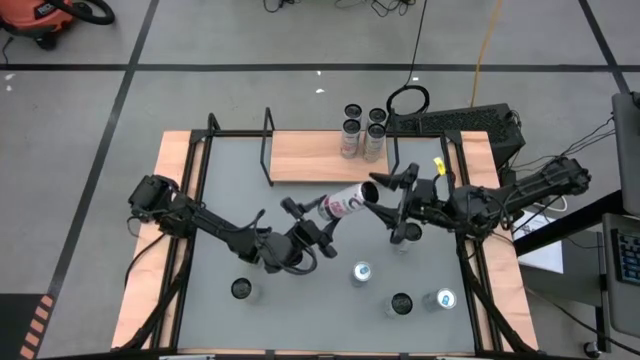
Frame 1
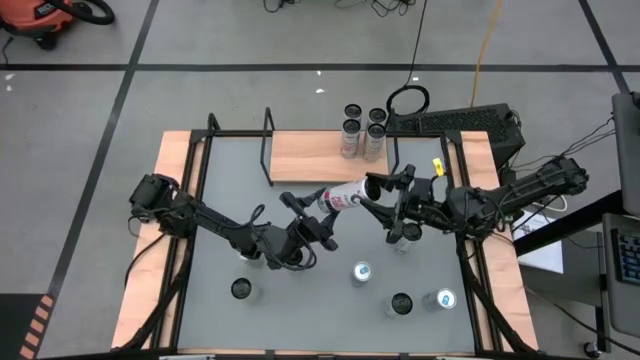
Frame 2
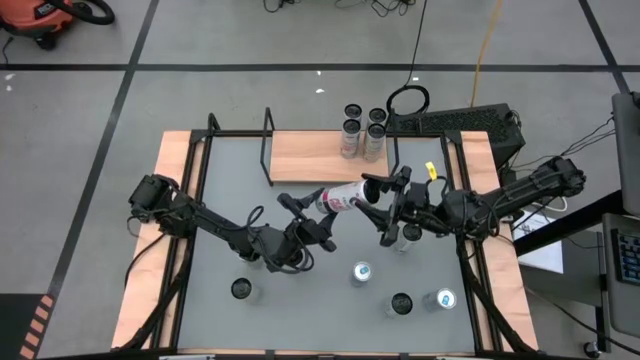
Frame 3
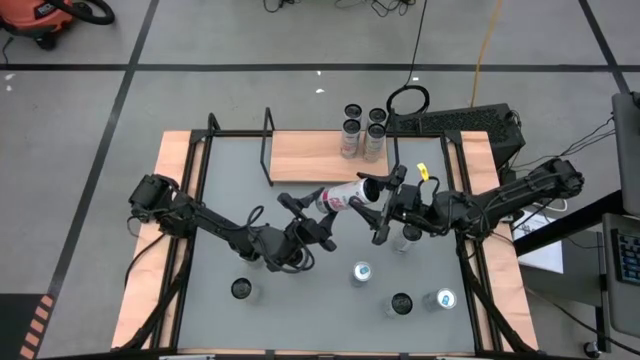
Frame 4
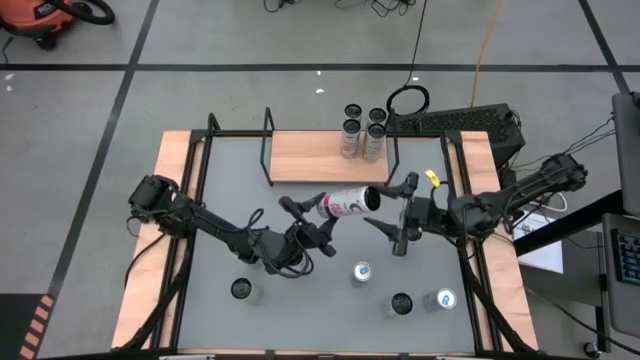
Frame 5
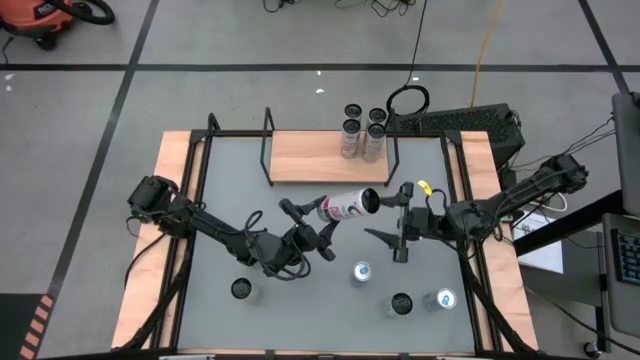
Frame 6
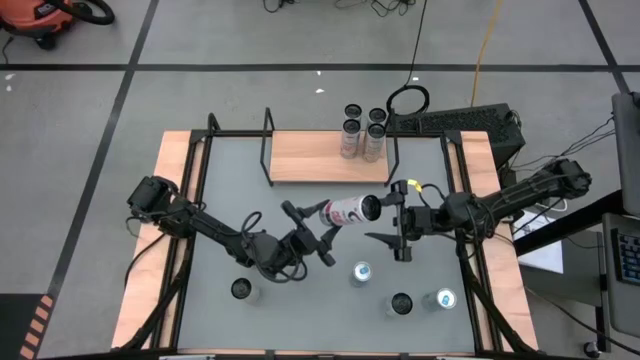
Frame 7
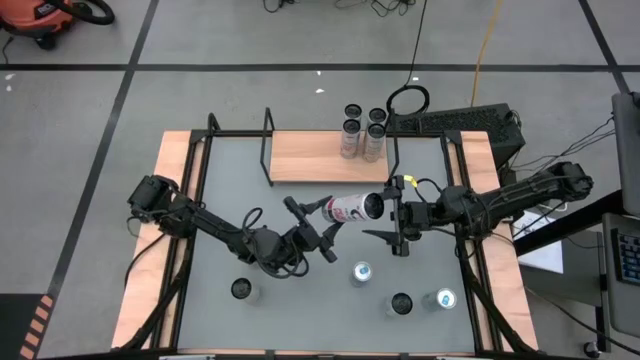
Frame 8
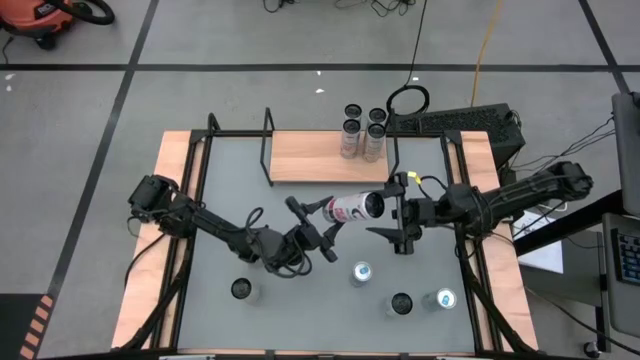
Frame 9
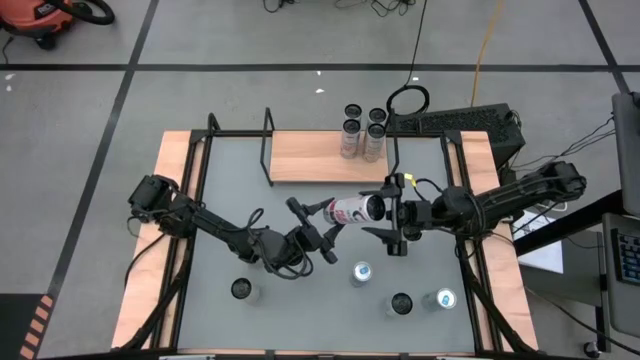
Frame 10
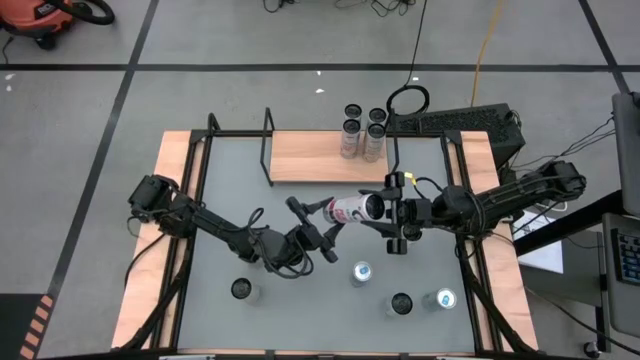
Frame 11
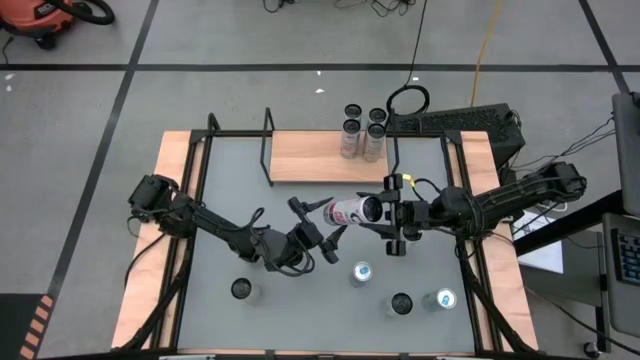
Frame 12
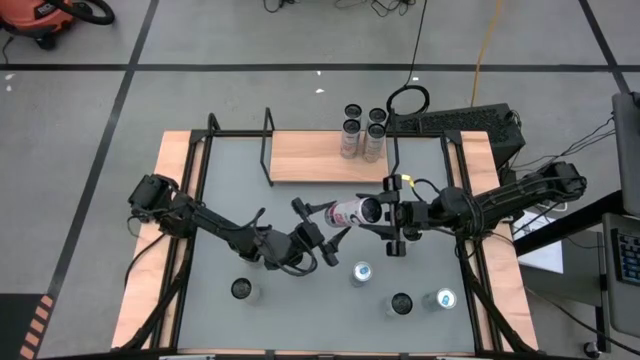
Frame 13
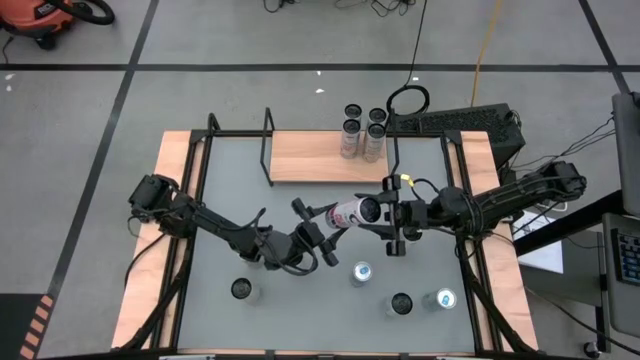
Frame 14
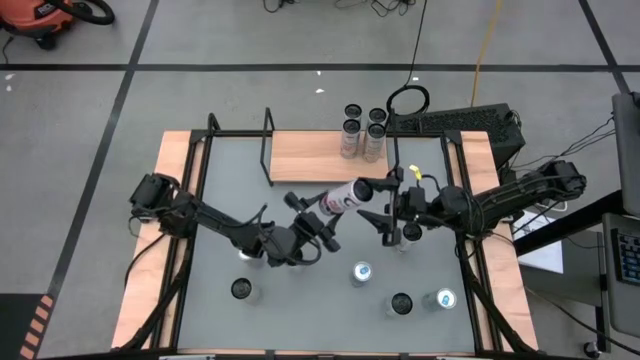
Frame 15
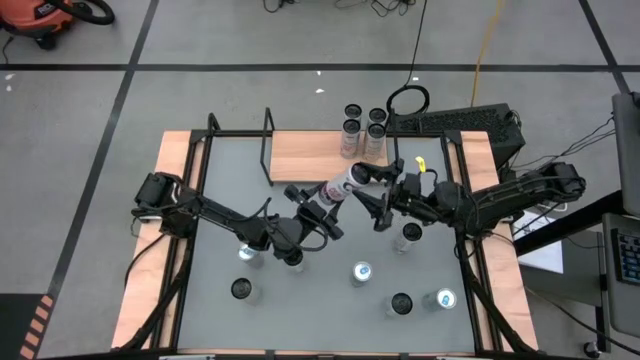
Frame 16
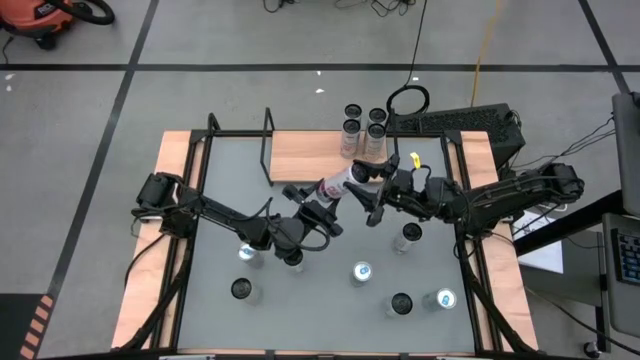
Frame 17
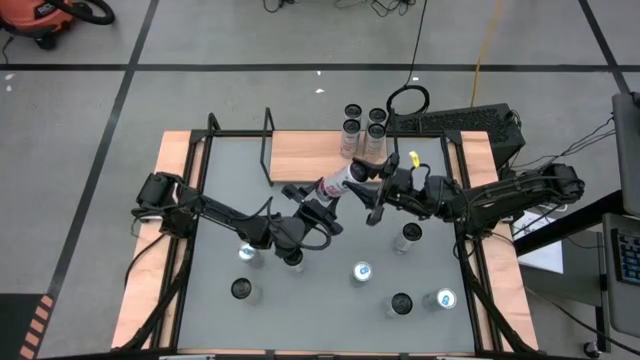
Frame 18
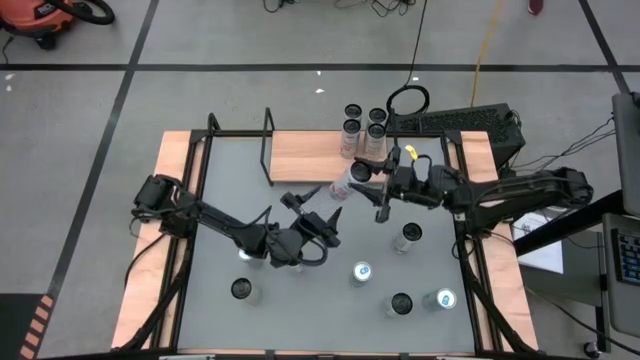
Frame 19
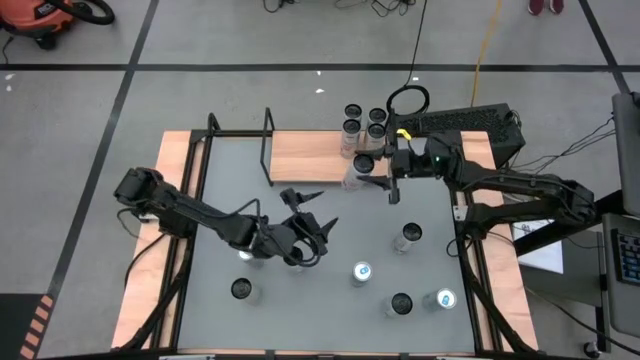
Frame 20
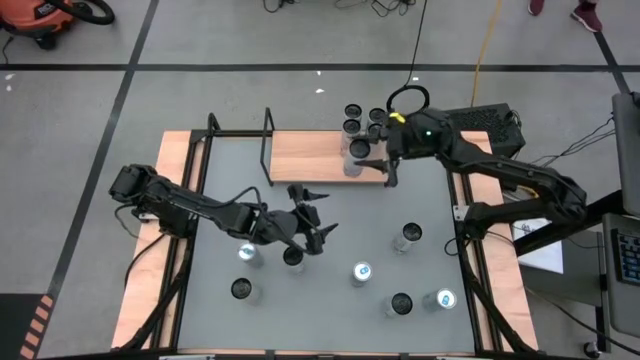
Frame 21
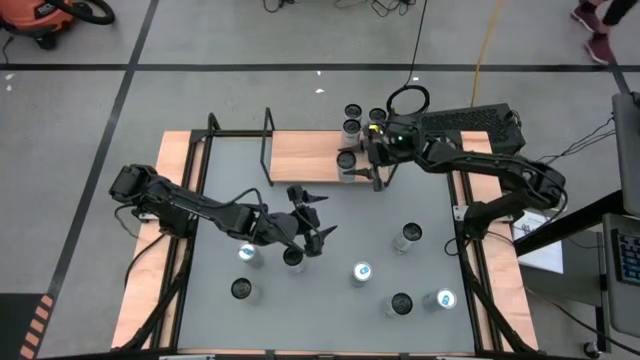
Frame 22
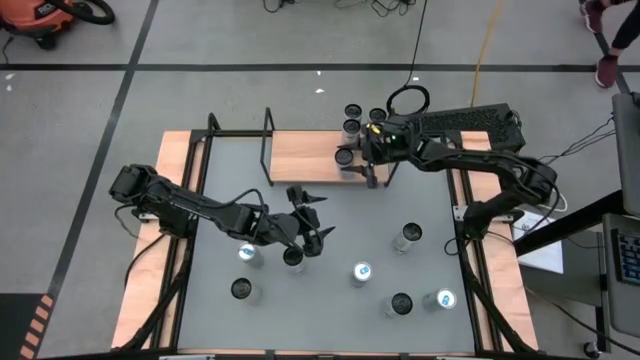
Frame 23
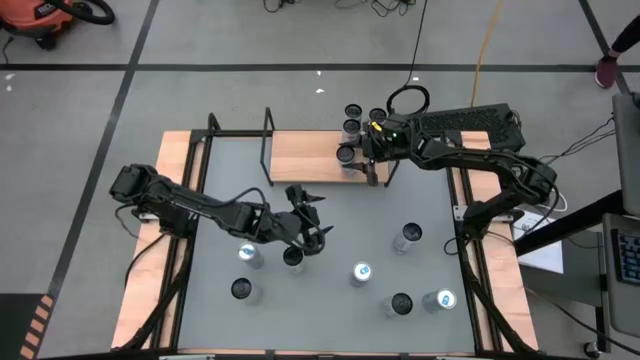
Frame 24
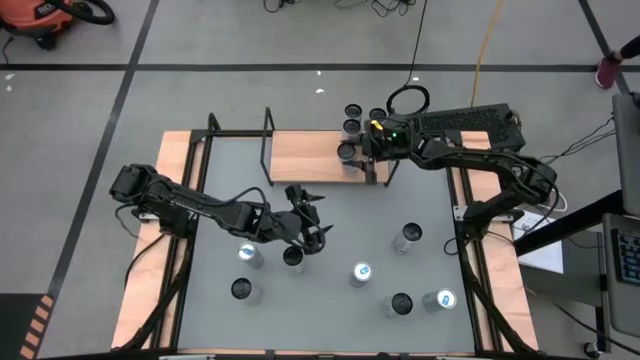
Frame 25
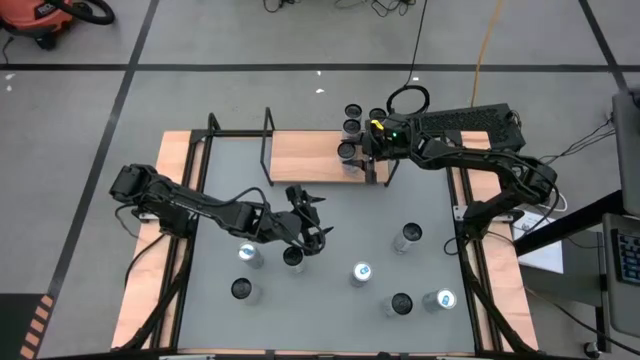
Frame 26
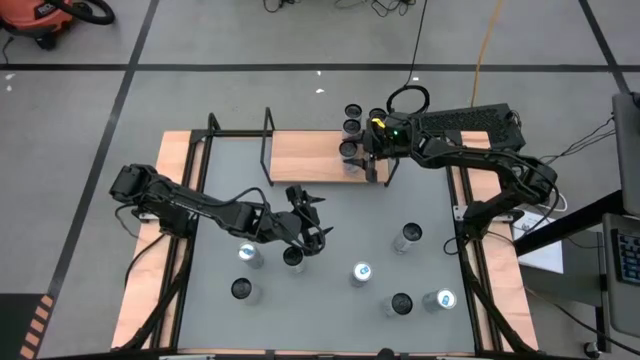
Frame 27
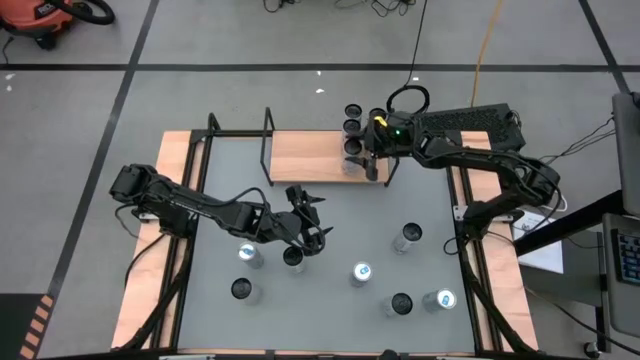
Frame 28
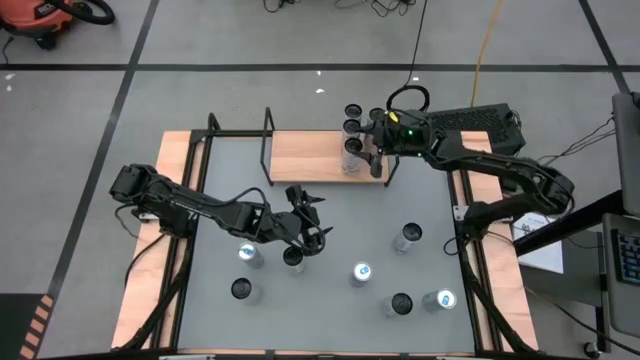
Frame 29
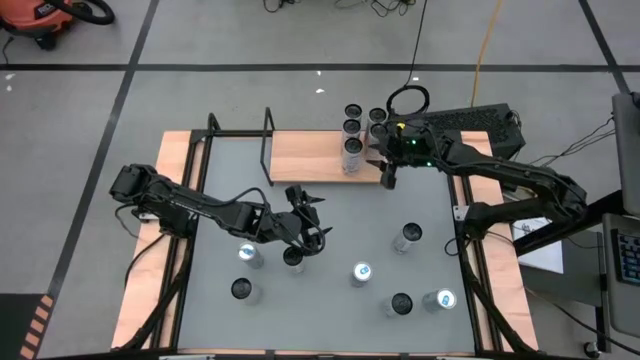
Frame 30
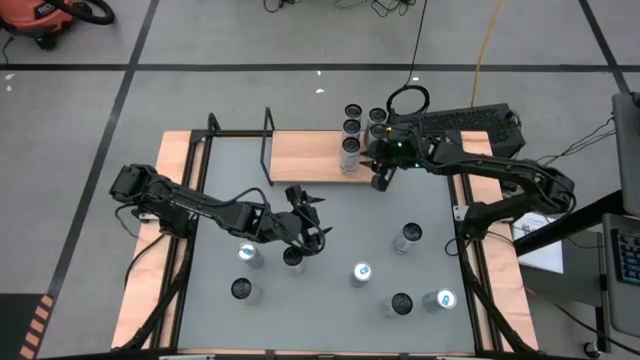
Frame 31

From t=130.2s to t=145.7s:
Task: Place canned beverage on shelf
Put the white pink soda can on the shelf aligned with the white pink soda cans

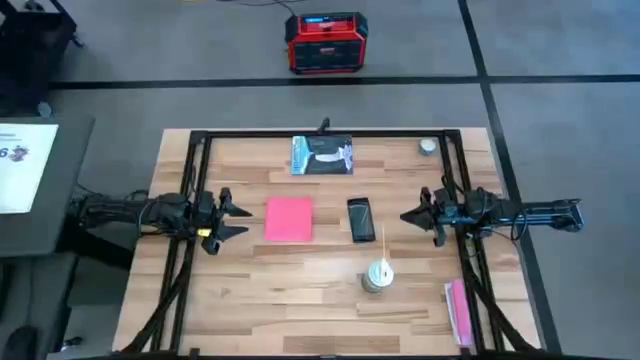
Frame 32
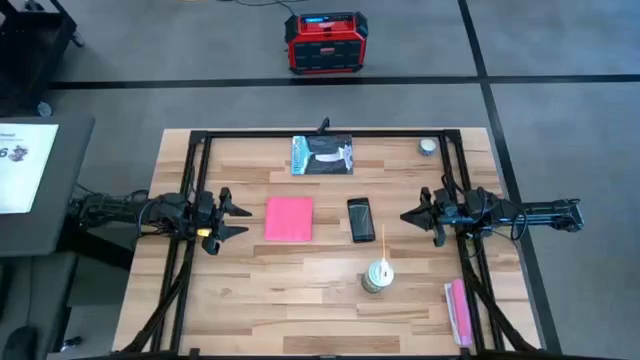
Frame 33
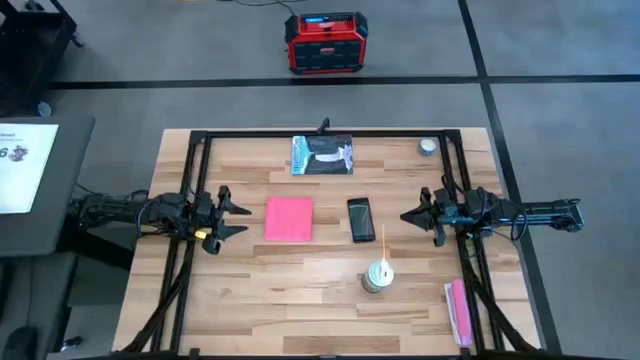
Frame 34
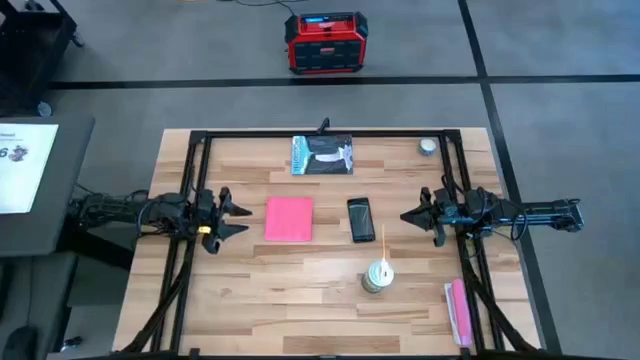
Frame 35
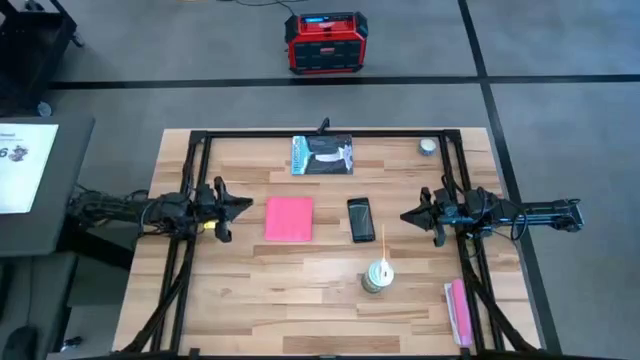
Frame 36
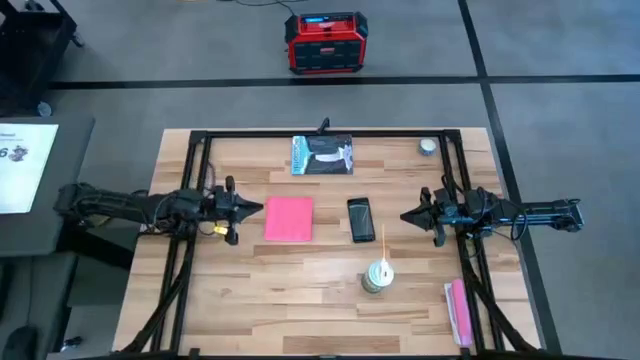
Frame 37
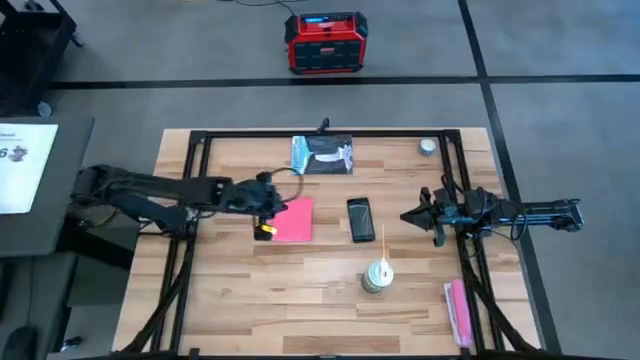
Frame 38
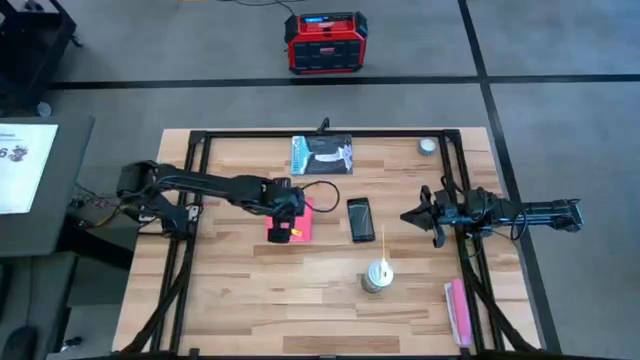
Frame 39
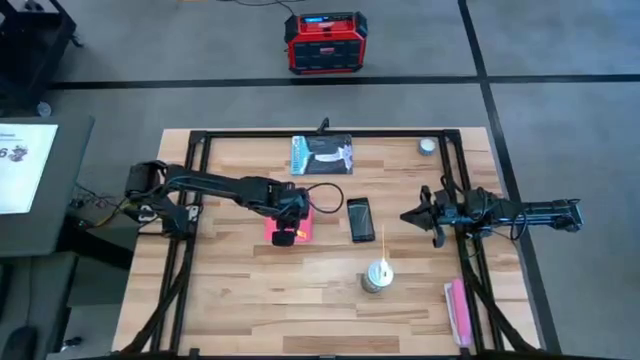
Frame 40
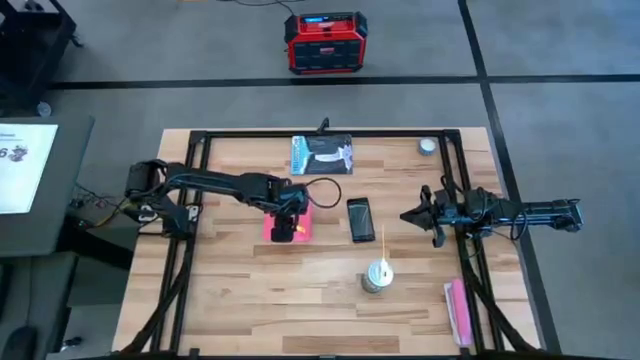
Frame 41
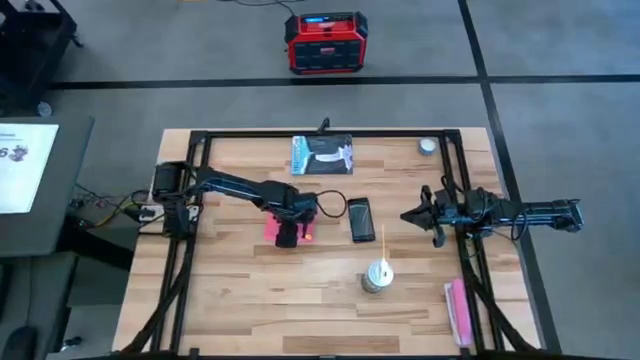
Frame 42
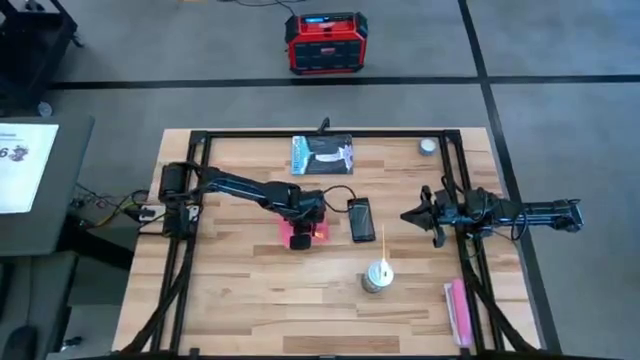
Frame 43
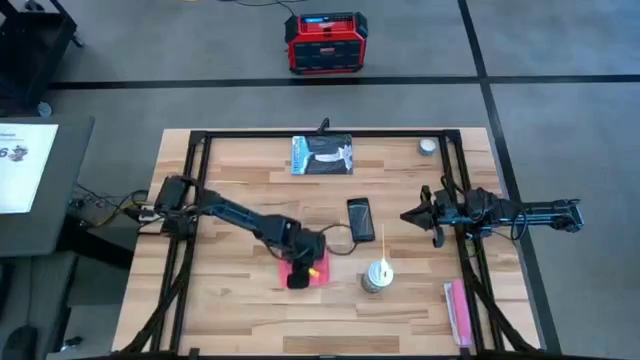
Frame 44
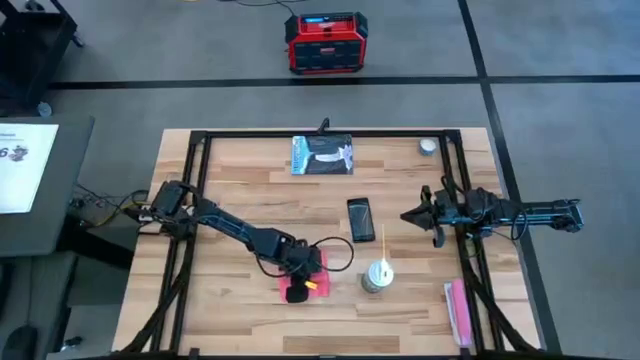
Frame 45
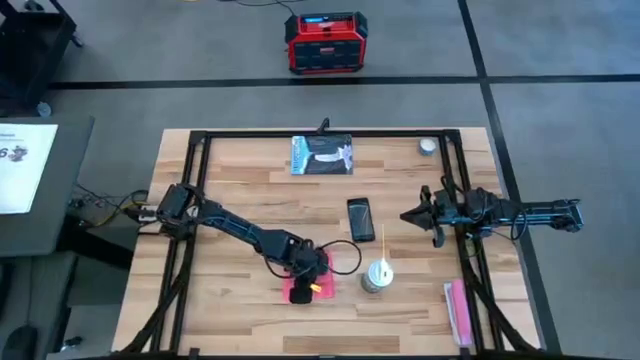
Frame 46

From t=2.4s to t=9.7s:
Task: Apply microfiber cloth
Move the pink microfiber cloth to the center of the table
